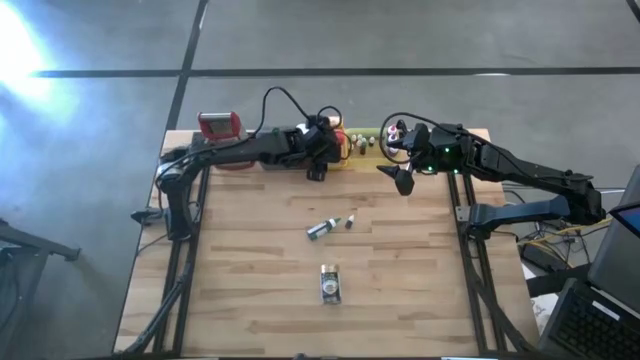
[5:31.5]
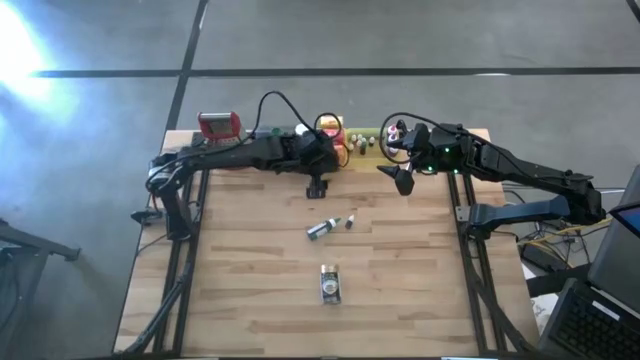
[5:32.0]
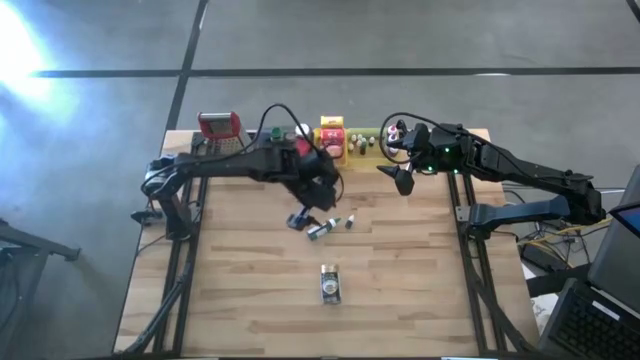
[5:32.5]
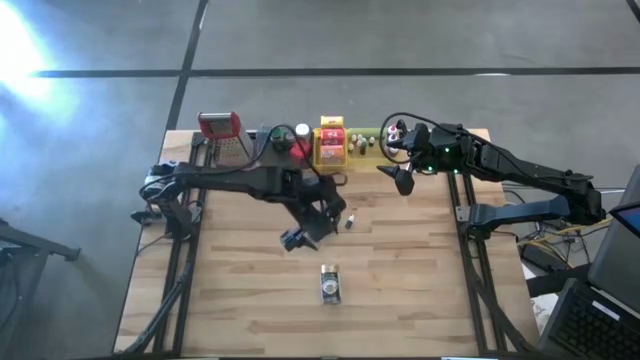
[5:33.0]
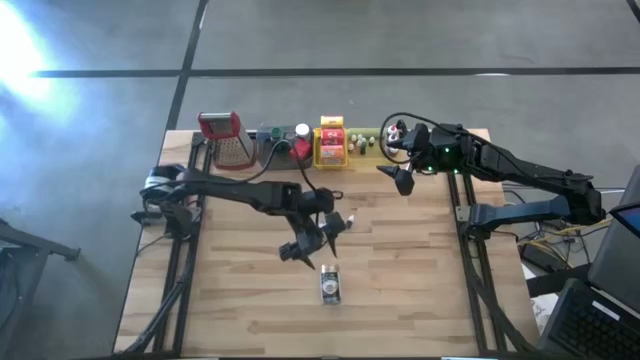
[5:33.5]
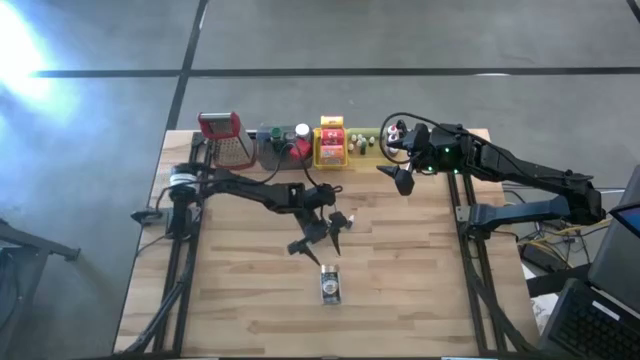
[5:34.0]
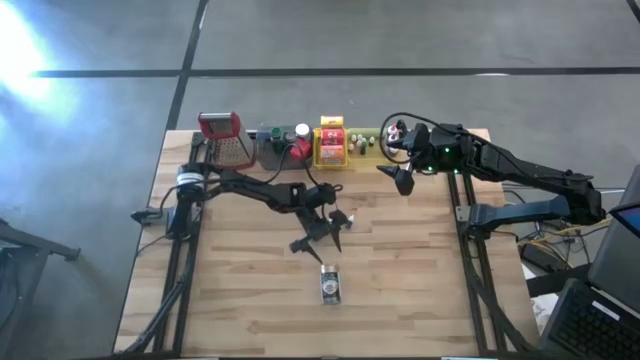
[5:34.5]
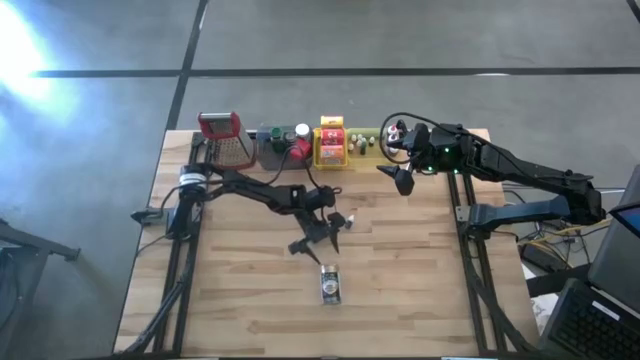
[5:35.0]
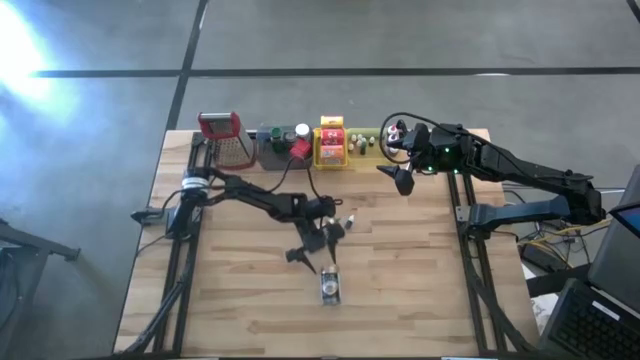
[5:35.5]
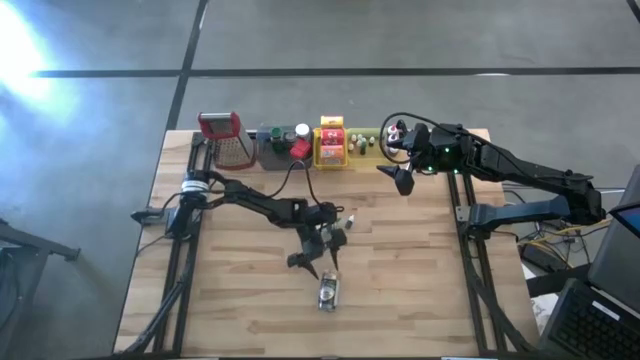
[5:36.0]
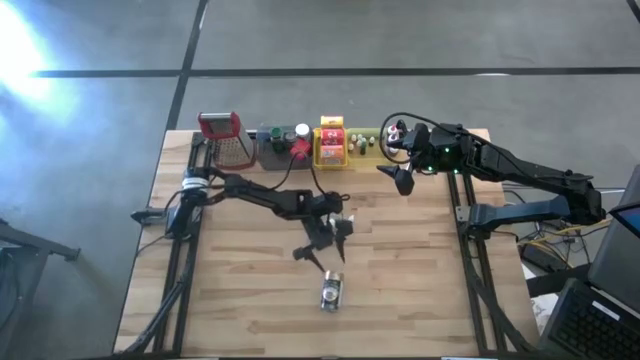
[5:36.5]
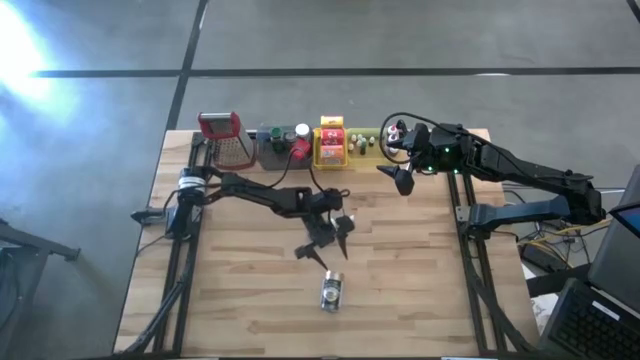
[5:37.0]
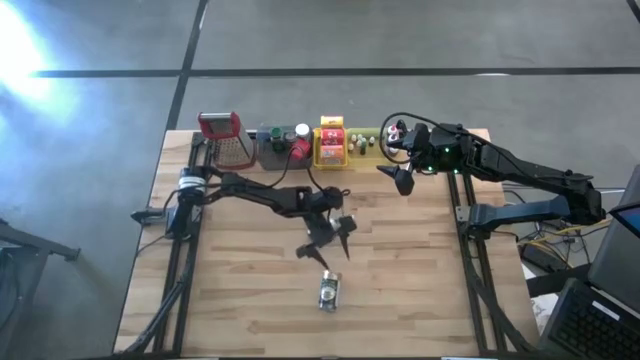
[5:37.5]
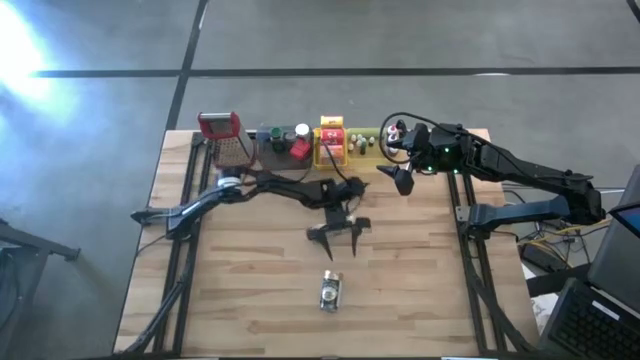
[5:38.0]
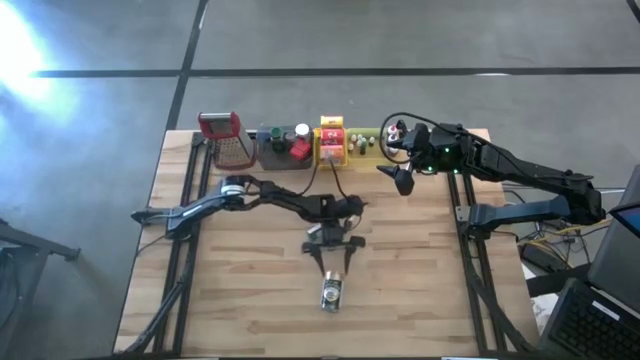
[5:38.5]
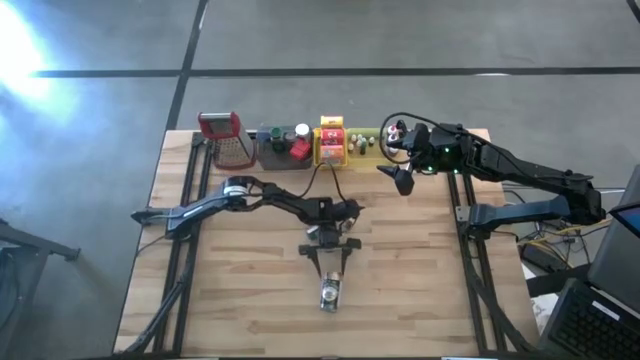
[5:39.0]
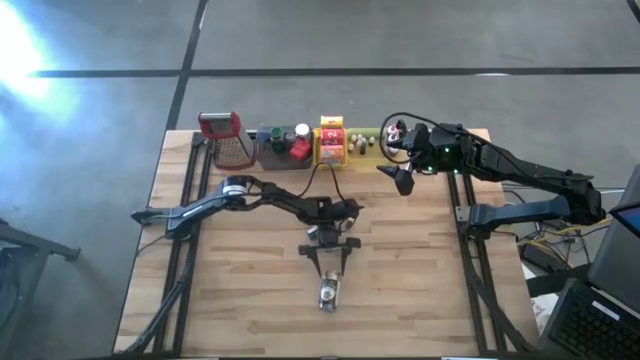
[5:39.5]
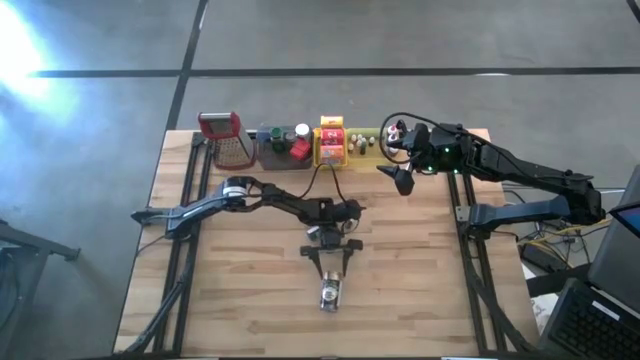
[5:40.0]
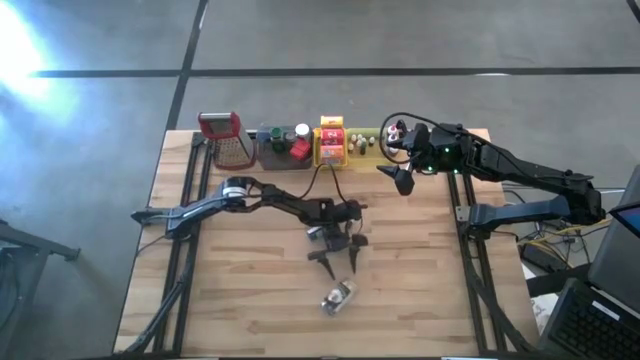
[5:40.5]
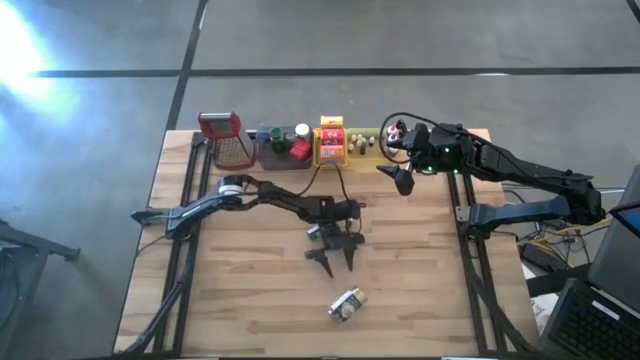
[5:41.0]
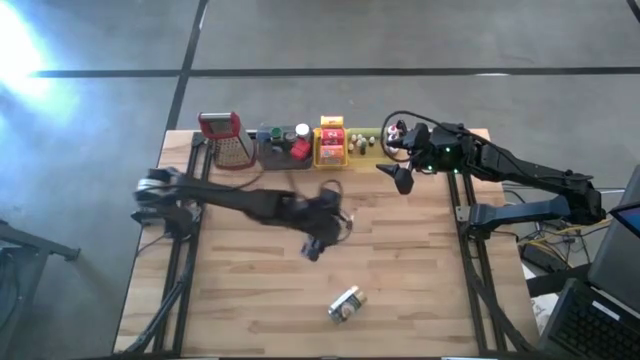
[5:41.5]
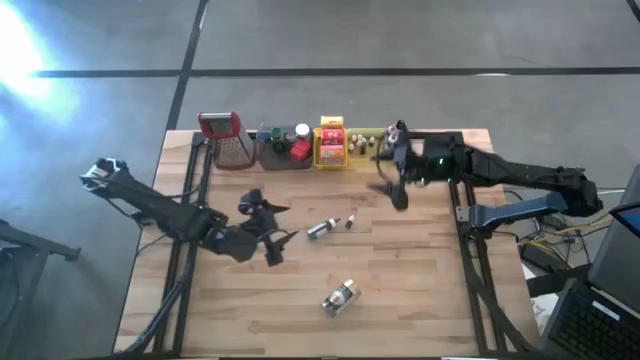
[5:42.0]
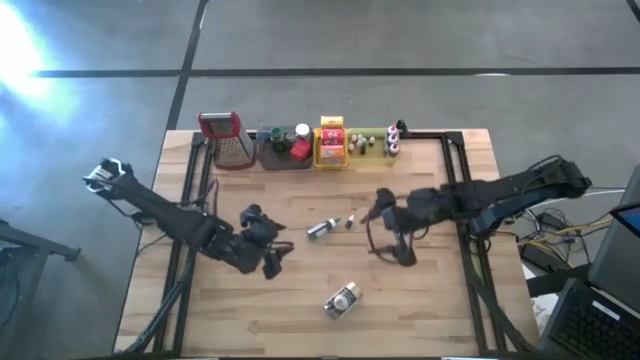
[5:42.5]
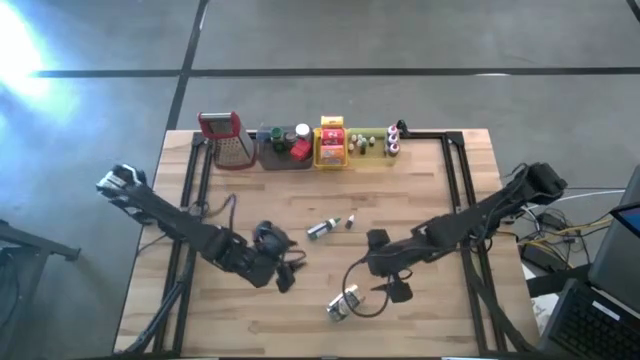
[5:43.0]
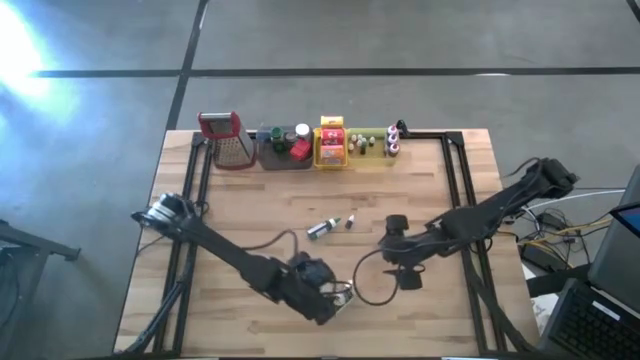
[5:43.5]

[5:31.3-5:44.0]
Task: Pick & Place Kitchen Items
Put the gold seasoning bottle into the black bin

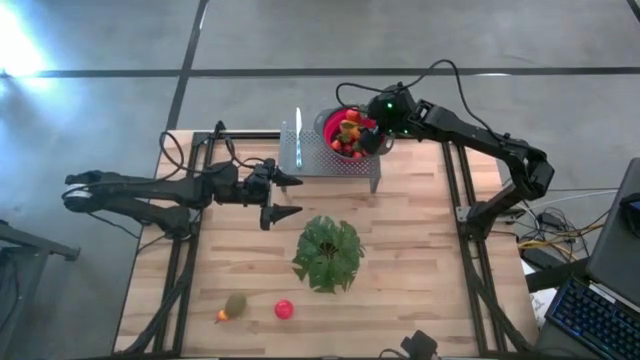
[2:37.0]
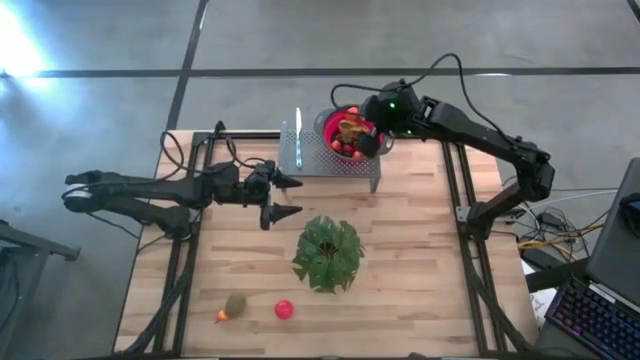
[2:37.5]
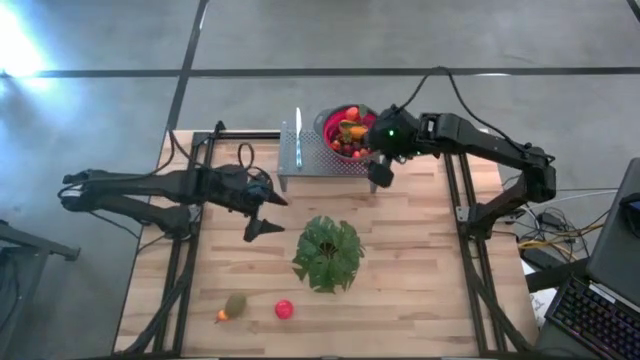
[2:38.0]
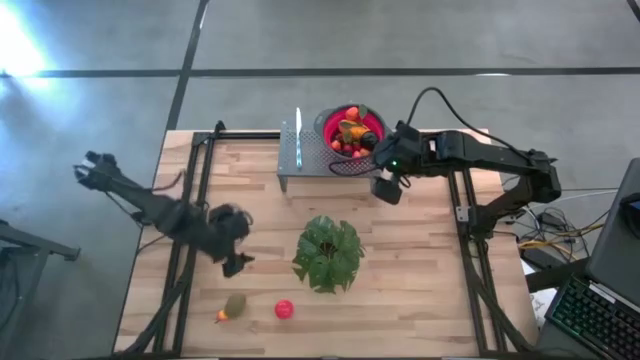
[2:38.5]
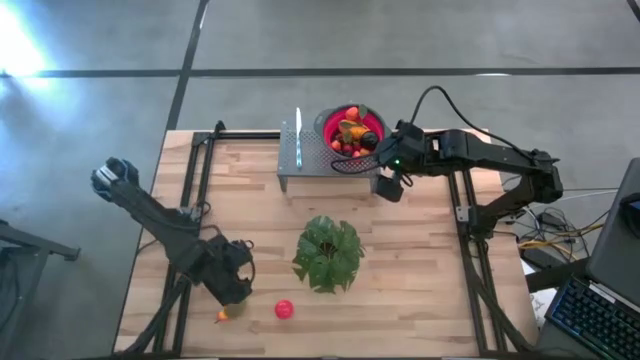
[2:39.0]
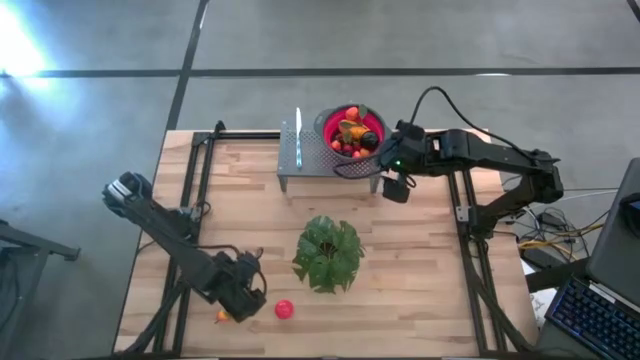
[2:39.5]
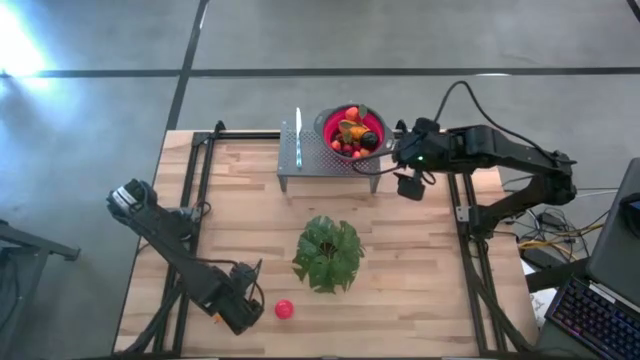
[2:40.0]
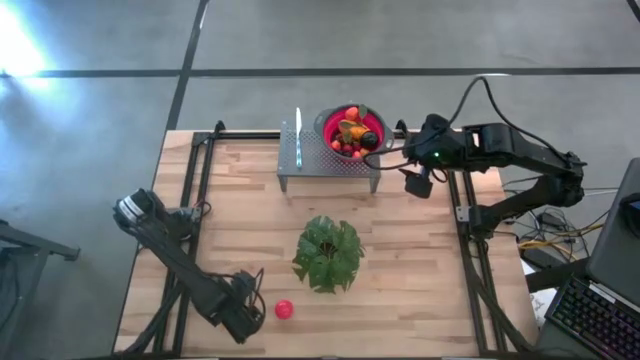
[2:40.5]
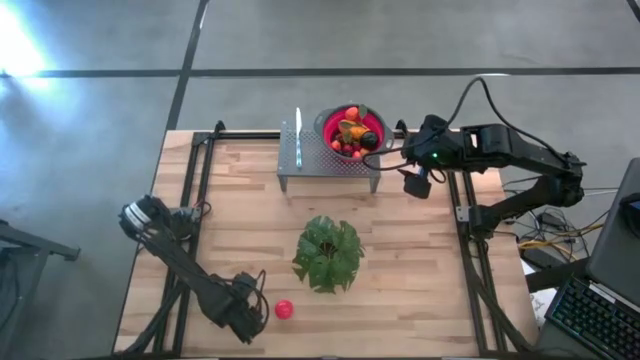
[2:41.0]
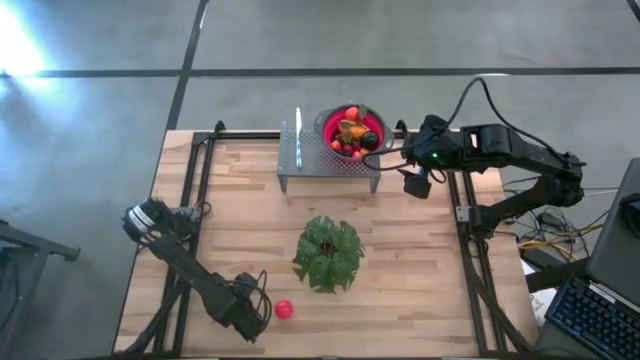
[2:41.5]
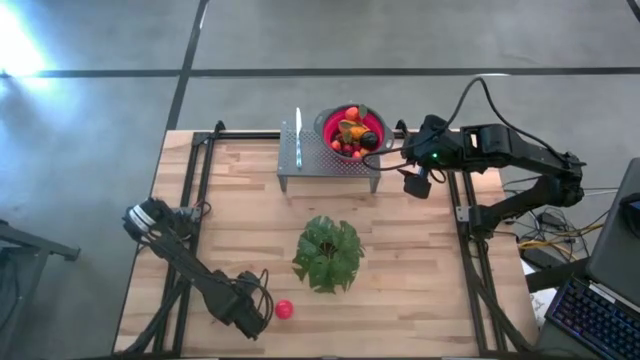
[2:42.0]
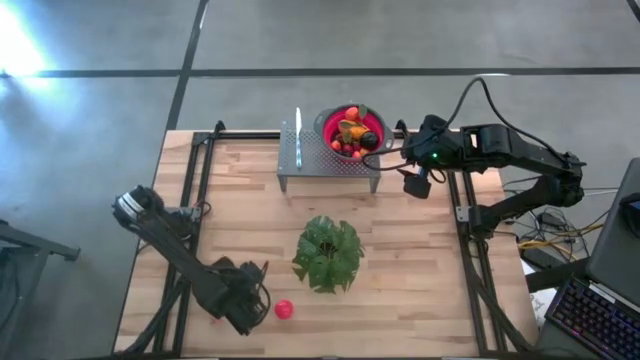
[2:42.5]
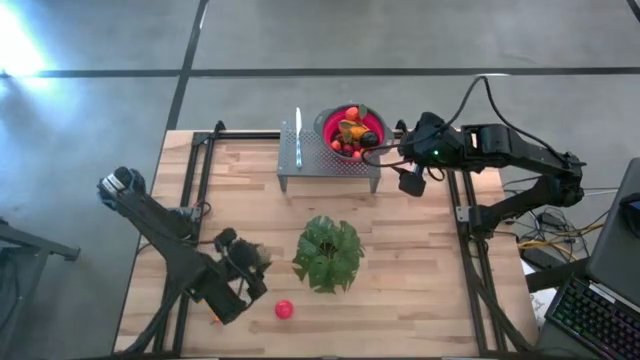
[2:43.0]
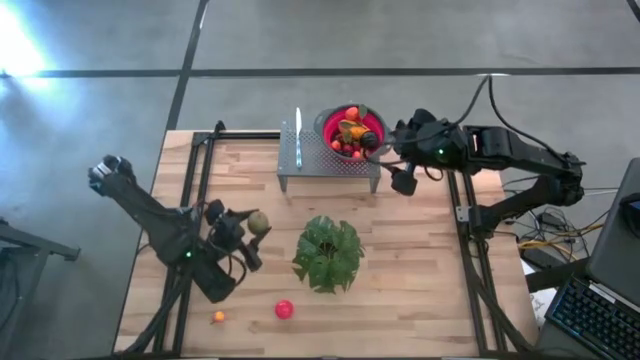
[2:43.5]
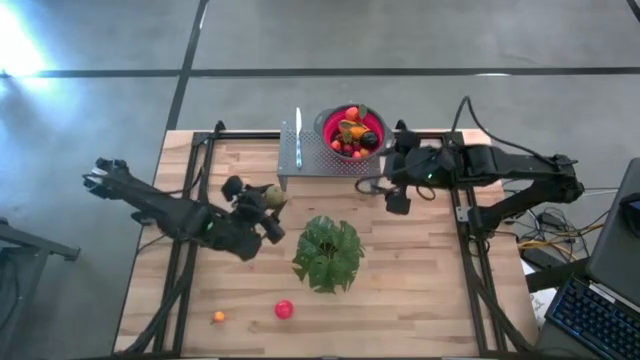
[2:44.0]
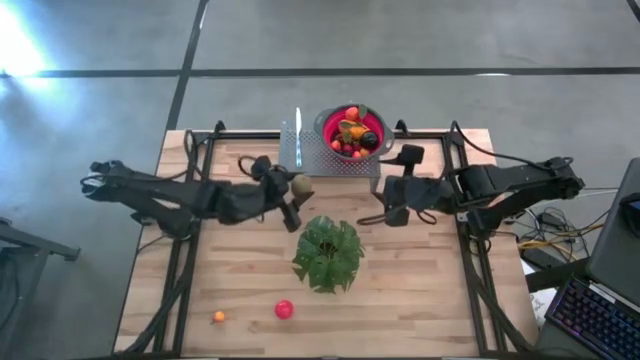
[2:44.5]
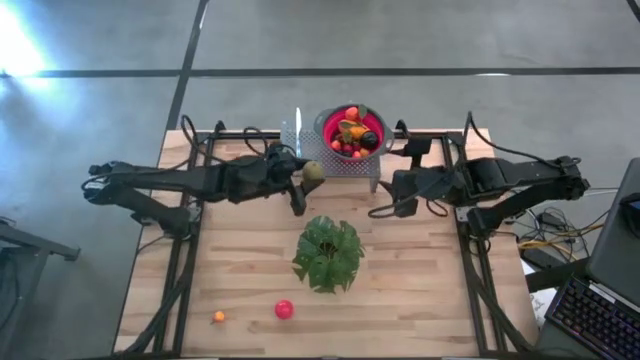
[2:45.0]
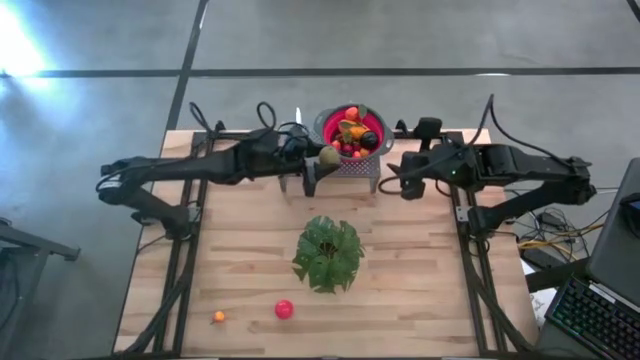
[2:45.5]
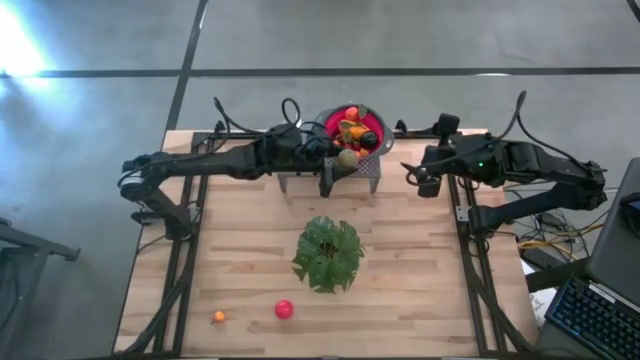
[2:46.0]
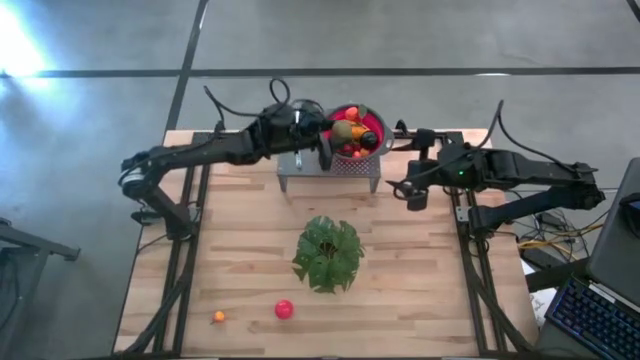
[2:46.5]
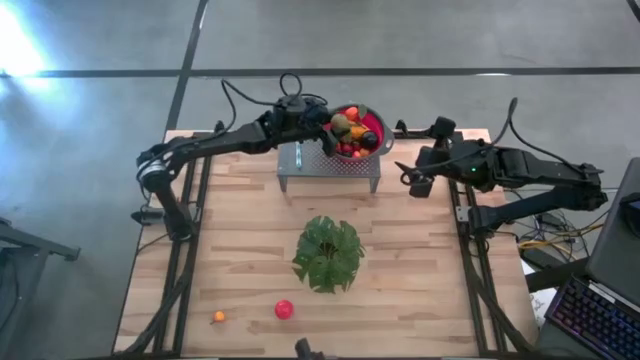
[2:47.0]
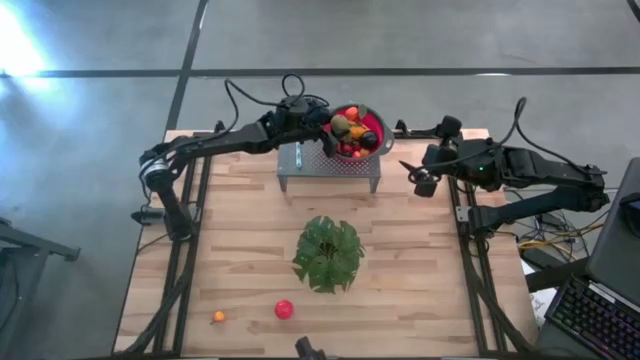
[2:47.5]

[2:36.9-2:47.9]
Task: Pick & Place Fruit
Put the kiwi into the red strainer bowl on the shelf
